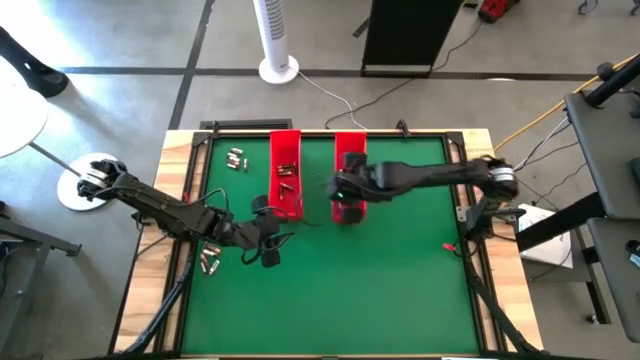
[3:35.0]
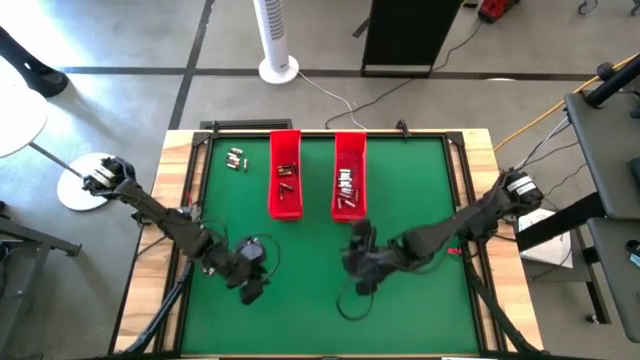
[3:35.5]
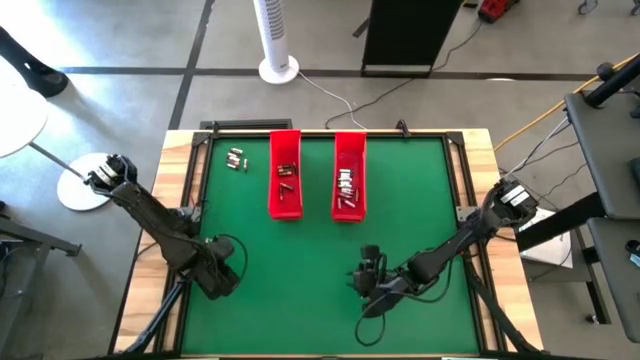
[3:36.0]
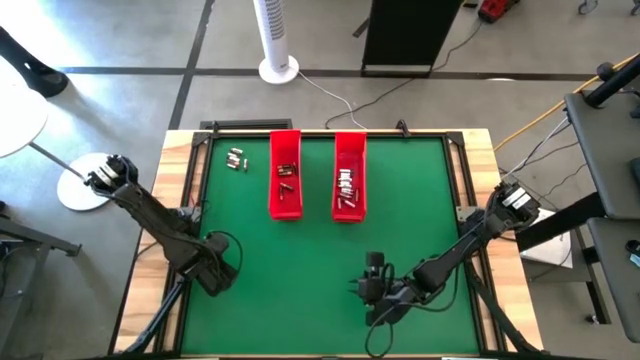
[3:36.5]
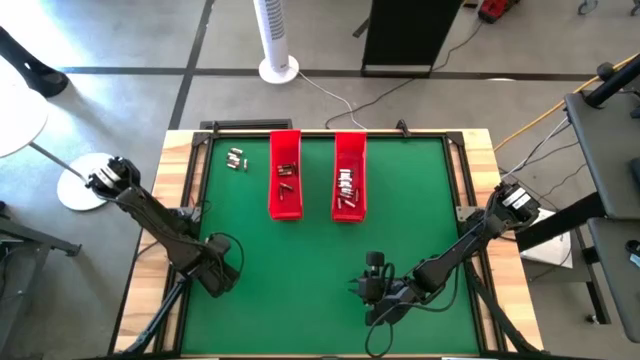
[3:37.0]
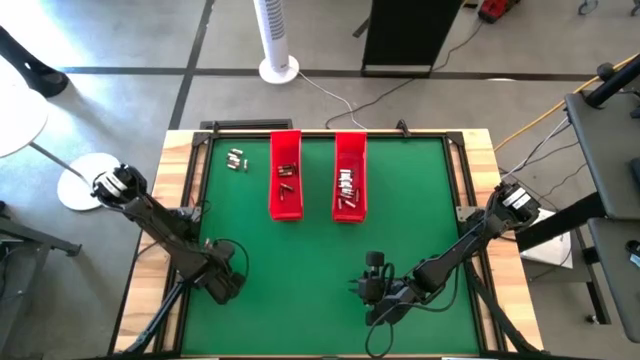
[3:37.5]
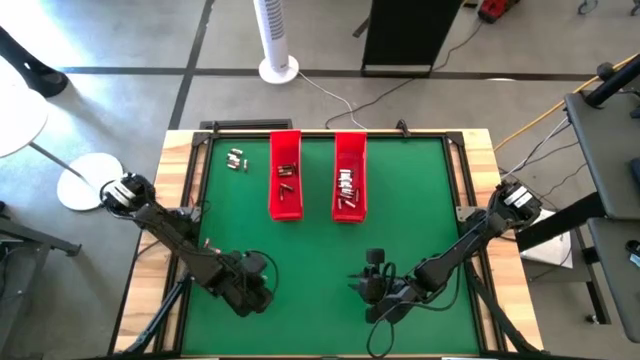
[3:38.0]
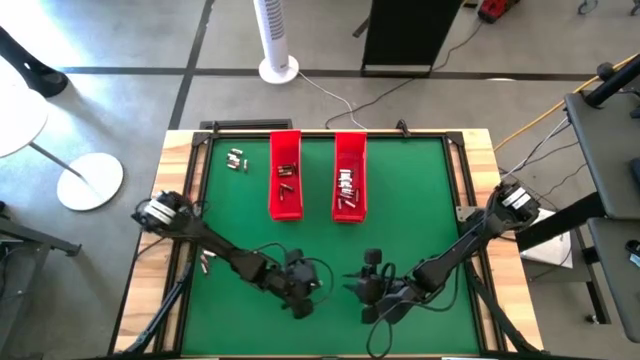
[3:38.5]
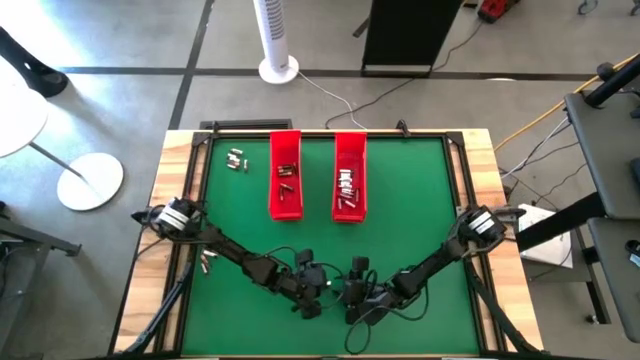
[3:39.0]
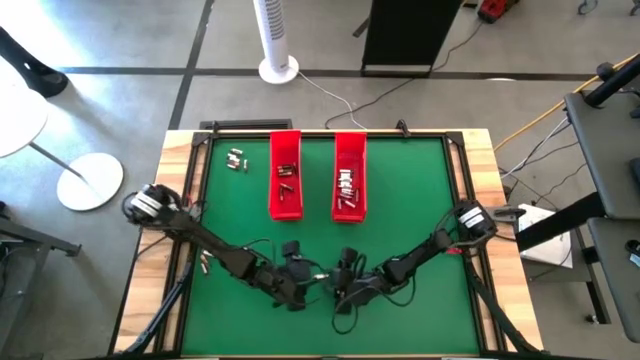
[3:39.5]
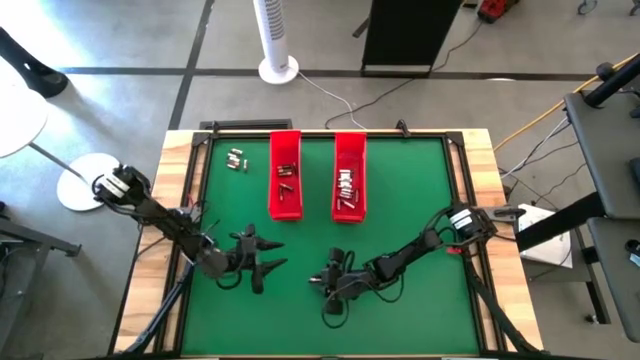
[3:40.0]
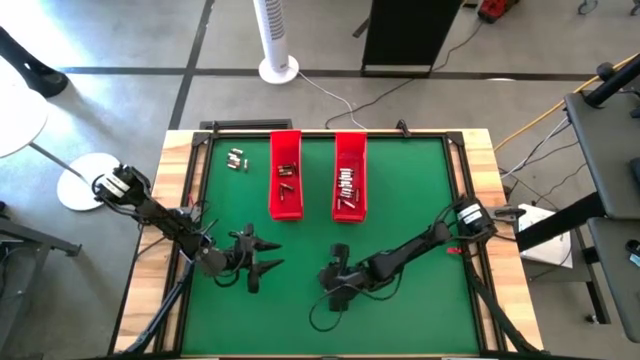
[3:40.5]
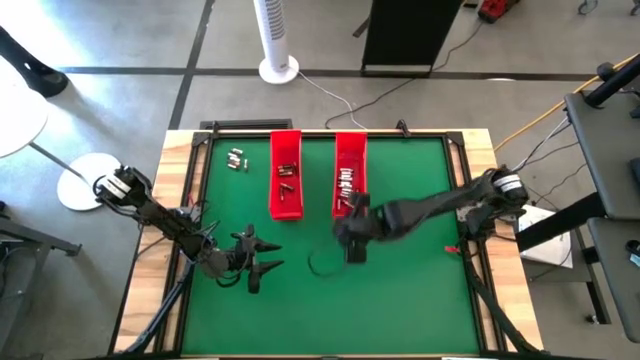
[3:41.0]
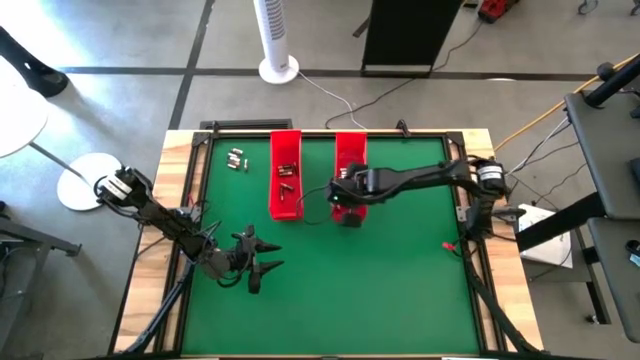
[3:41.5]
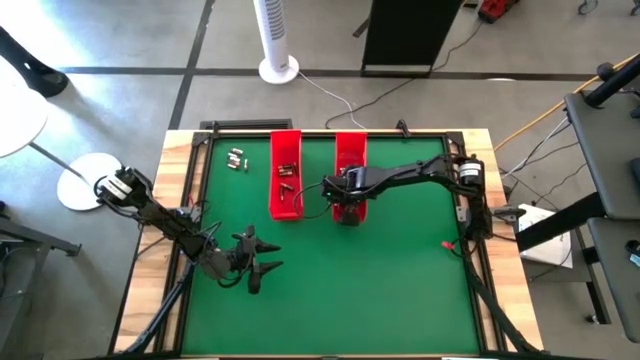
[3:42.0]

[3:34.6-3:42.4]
Task: Sort batteries
Put the silver battery into the right red bin

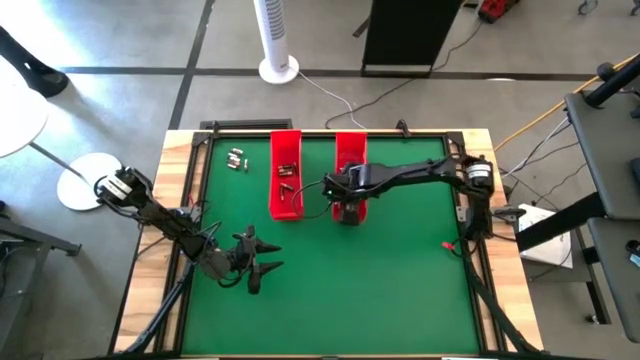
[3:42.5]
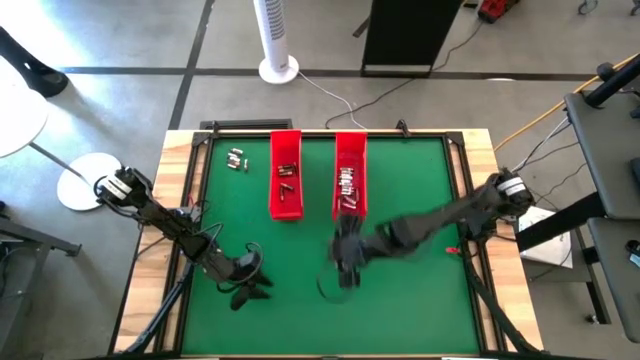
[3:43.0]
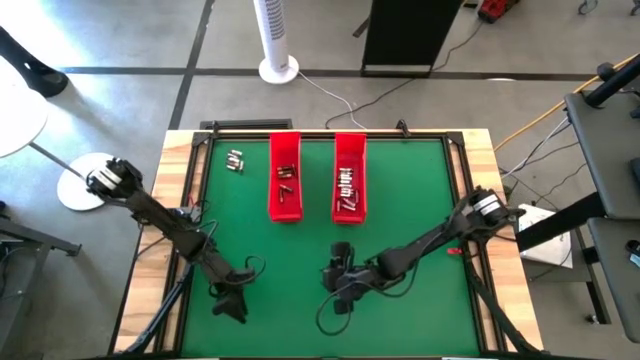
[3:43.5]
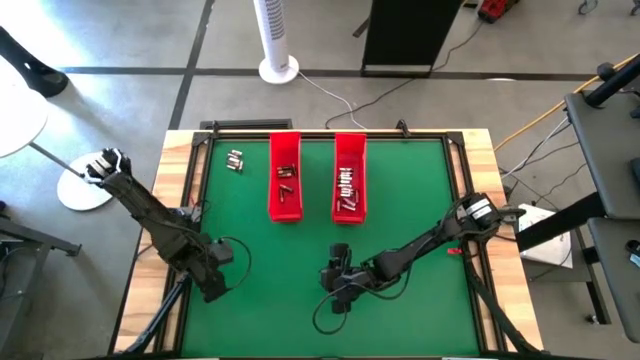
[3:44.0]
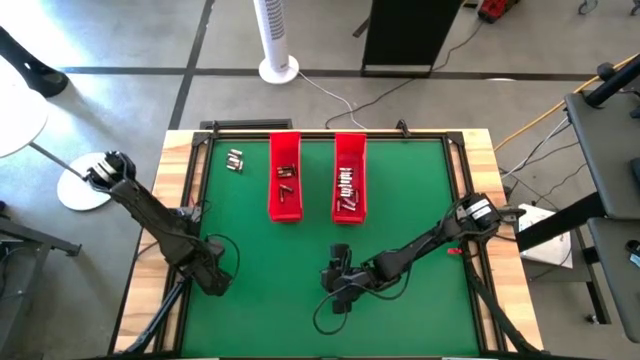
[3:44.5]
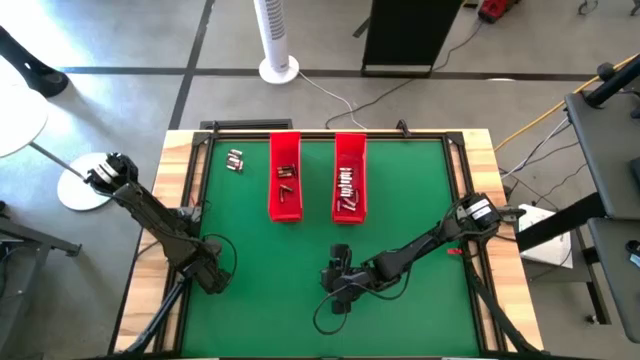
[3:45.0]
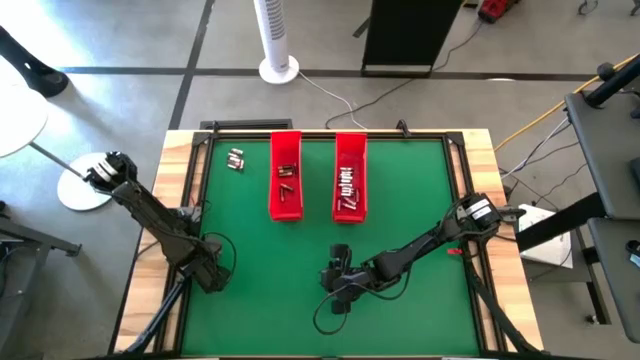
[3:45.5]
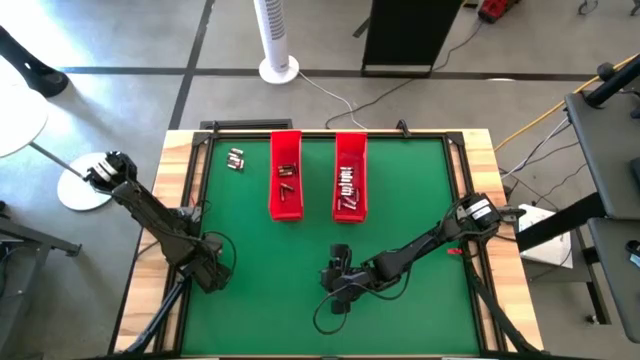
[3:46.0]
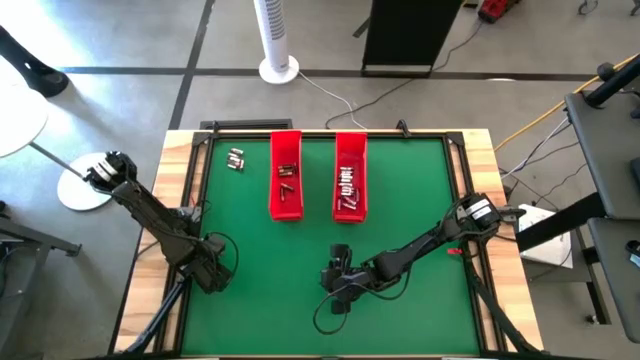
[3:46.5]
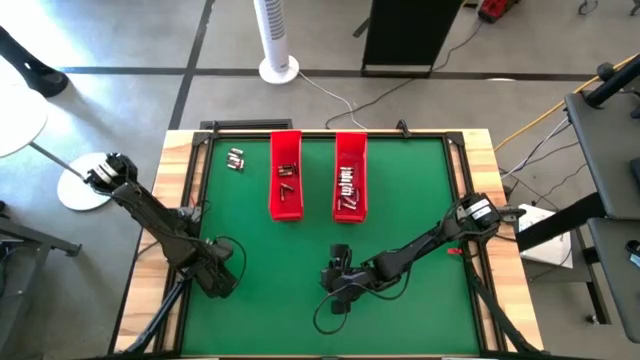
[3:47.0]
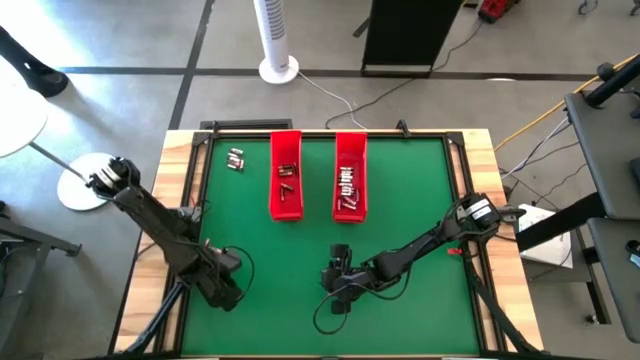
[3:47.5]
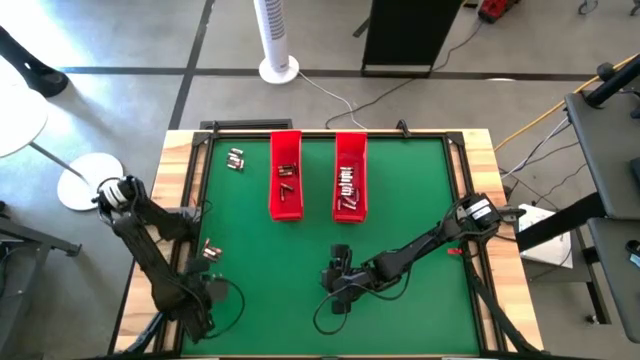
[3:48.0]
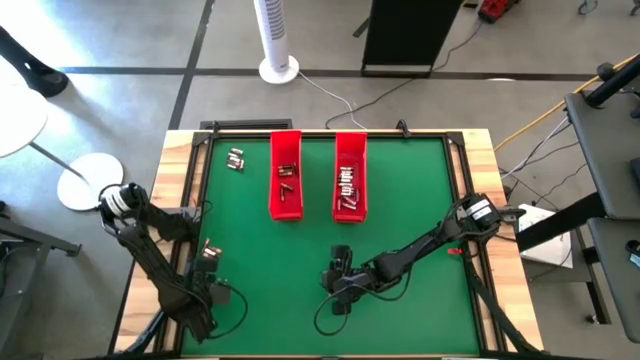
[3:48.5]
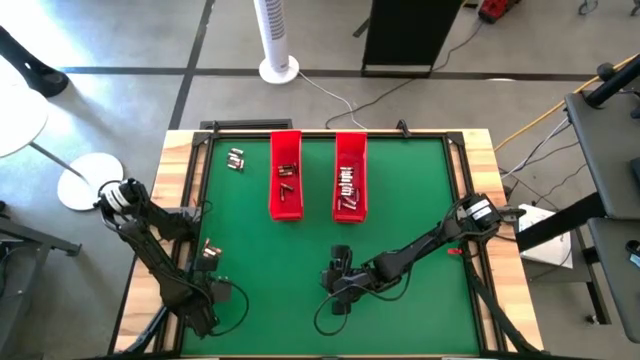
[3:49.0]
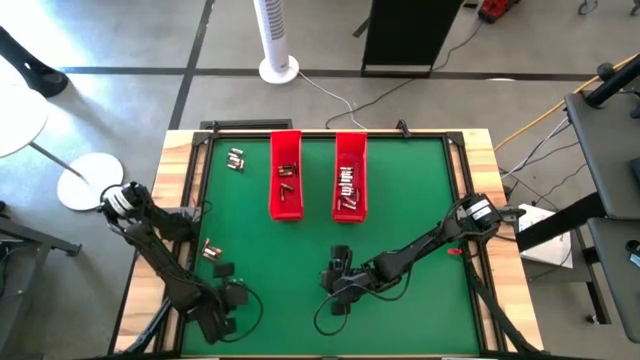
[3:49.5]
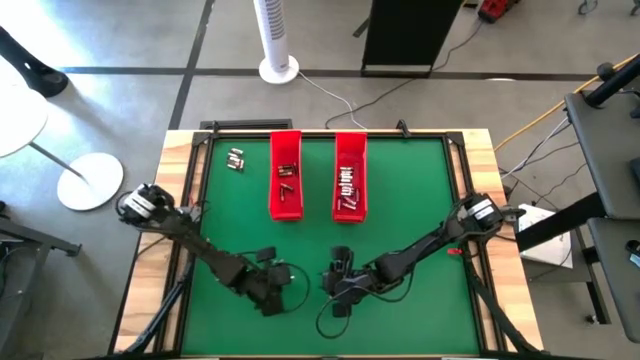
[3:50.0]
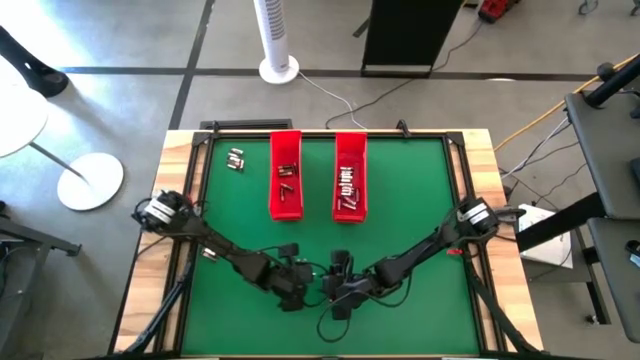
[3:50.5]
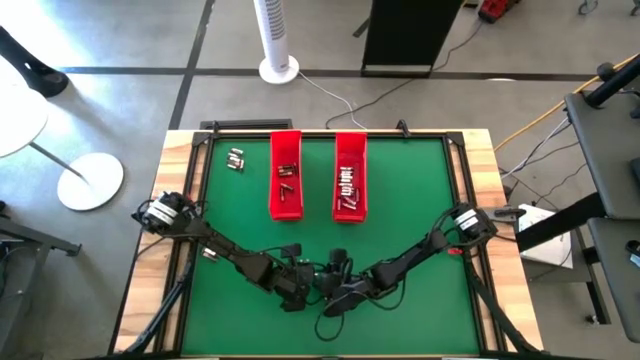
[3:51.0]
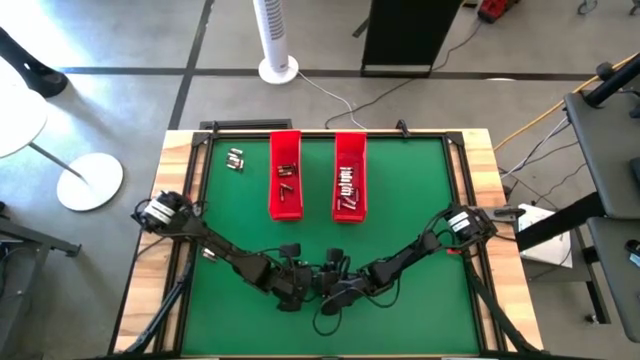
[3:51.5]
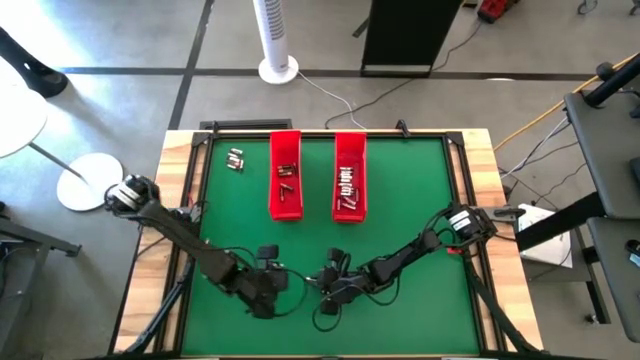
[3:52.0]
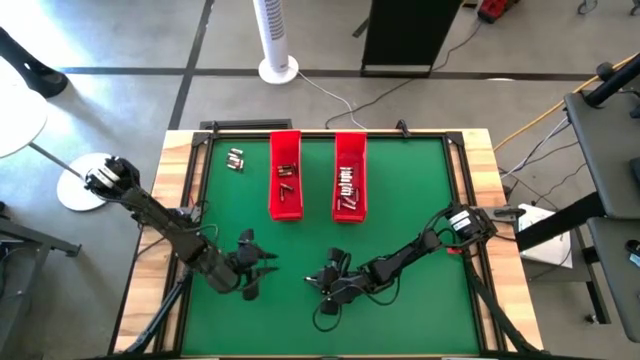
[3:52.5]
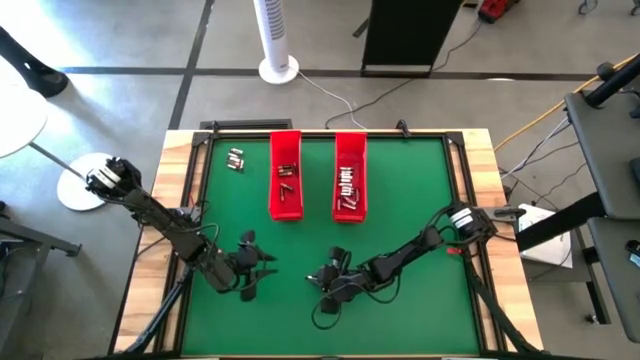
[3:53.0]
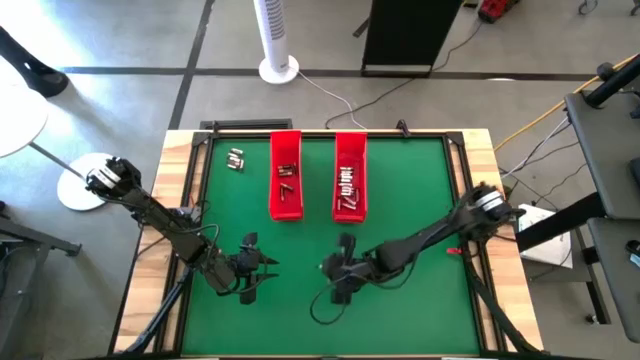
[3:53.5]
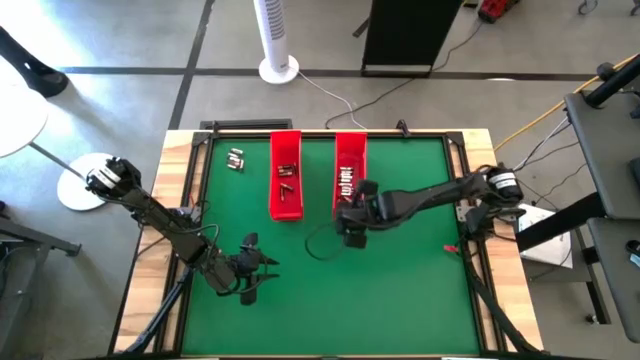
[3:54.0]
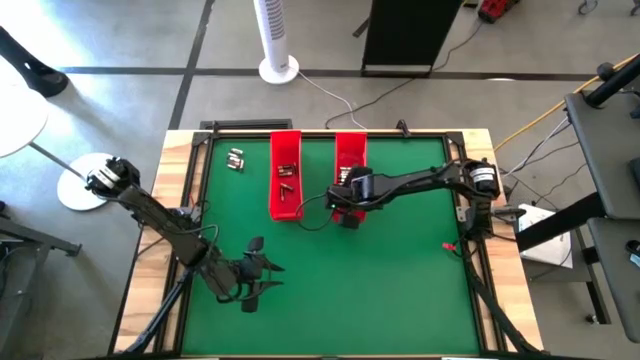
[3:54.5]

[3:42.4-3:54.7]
Put the silver battery into the right red bin
